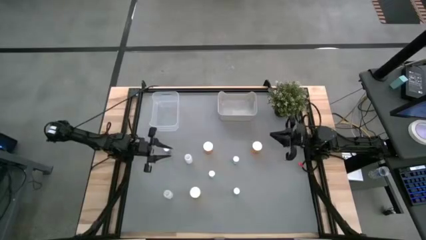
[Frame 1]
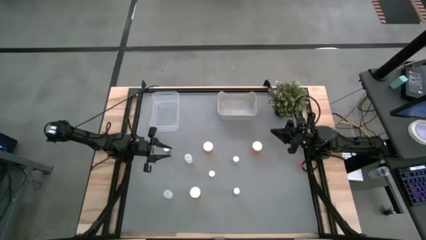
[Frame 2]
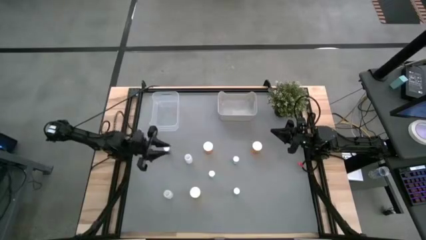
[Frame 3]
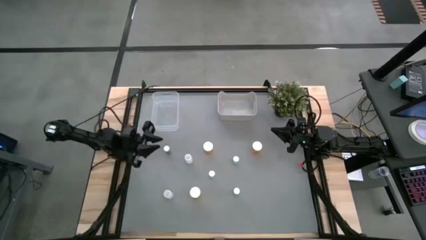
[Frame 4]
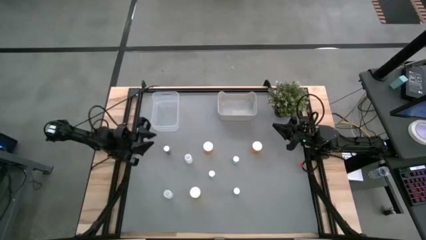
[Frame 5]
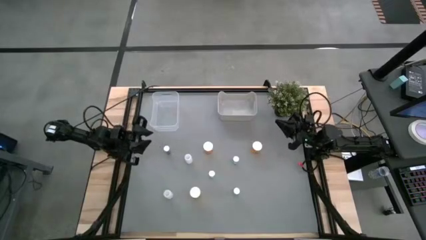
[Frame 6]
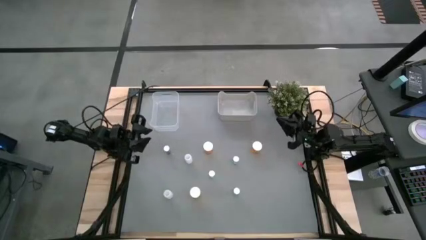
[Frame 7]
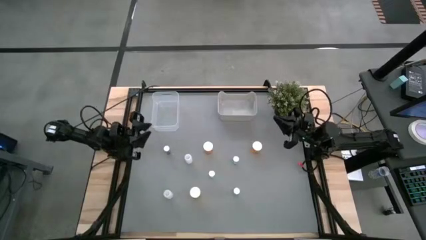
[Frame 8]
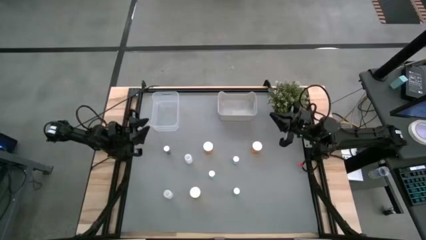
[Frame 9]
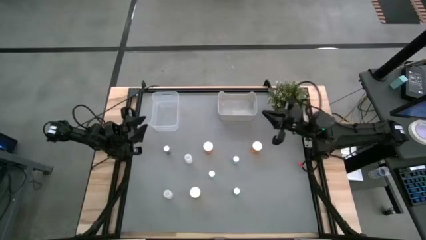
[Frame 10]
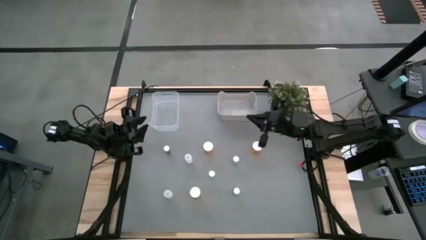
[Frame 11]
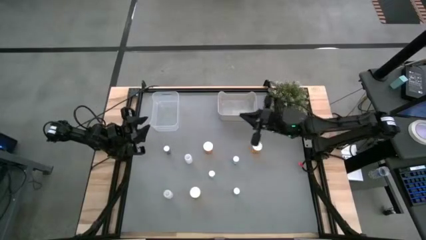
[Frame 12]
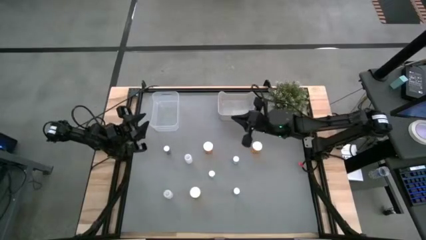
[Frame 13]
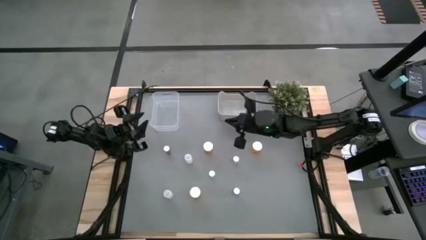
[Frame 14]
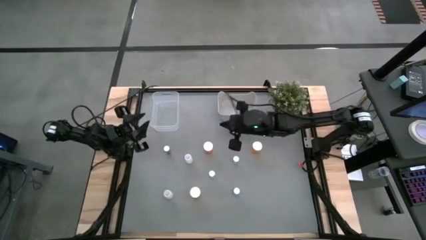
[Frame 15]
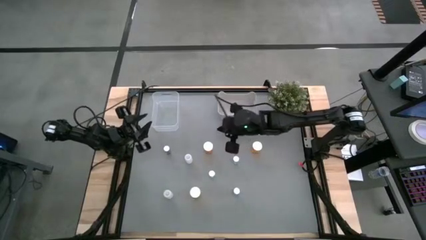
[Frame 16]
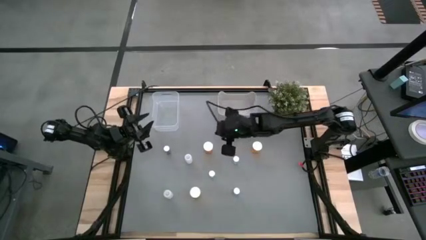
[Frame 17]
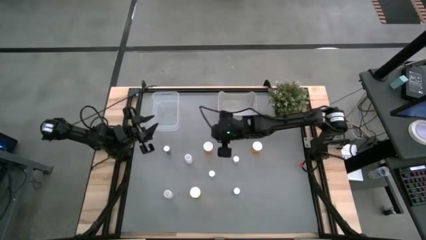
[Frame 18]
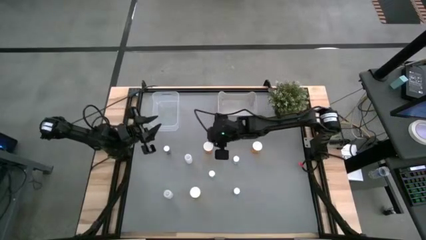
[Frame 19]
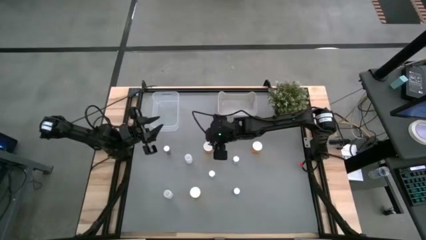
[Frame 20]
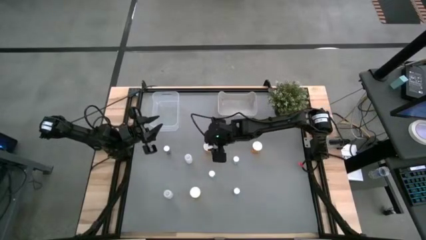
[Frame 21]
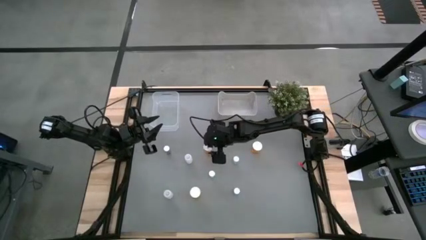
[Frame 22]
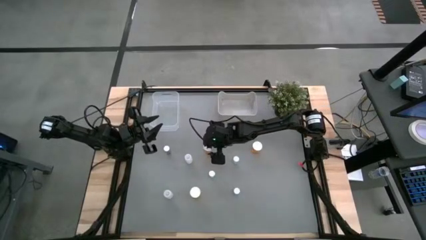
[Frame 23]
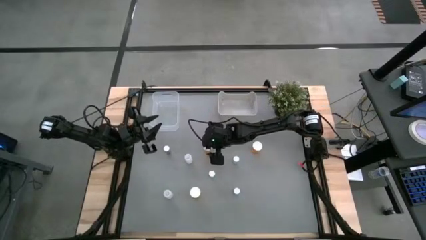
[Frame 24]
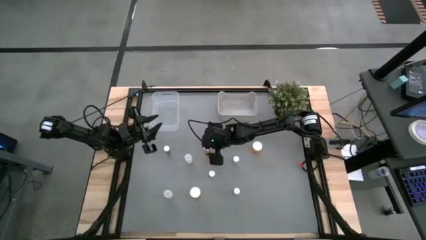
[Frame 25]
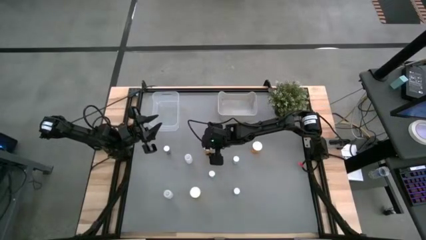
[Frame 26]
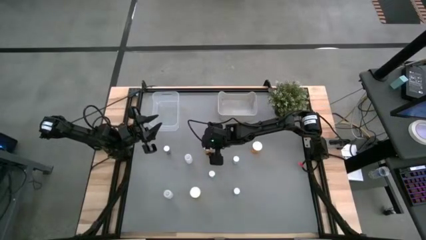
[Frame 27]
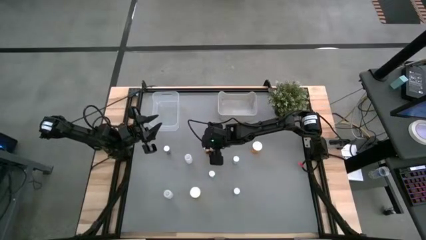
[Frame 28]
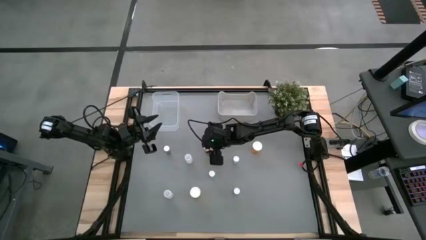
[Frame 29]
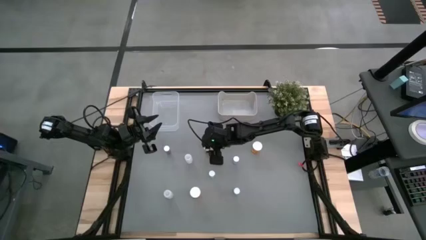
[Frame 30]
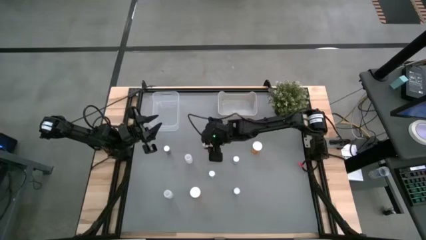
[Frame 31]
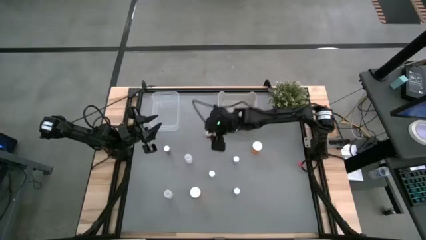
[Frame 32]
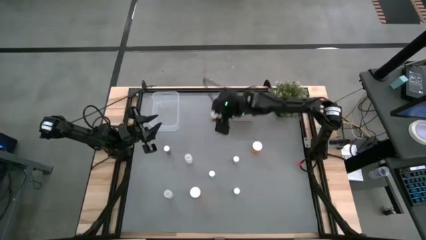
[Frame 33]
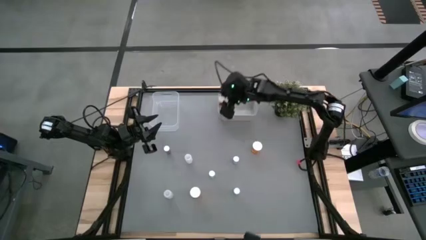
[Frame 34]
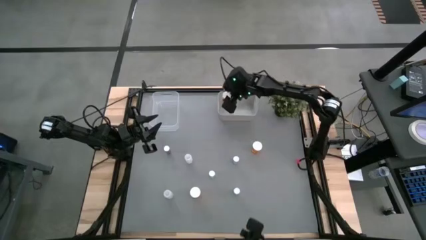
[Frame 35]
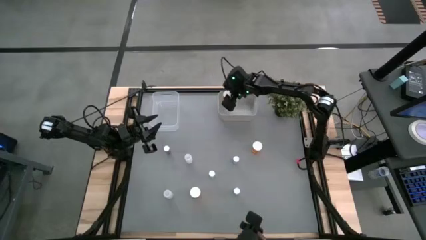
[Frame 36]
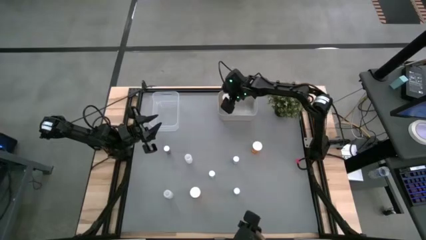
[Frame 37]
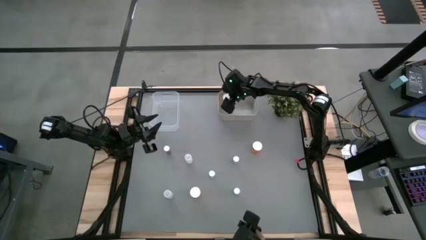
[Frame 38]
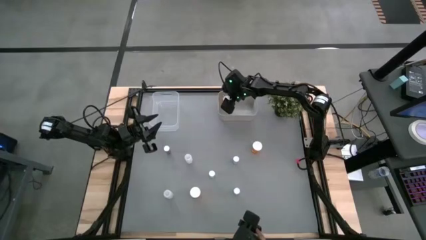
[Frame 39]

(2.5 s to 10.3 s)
Task: Pick and place medicine bottles into bin by pill shape (circle, oval)
Put the top left orange capsule bottle into the gray bin

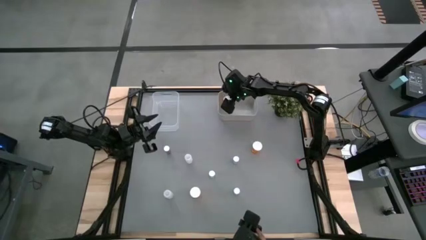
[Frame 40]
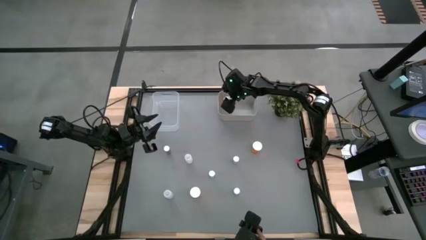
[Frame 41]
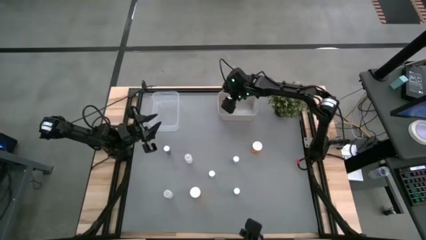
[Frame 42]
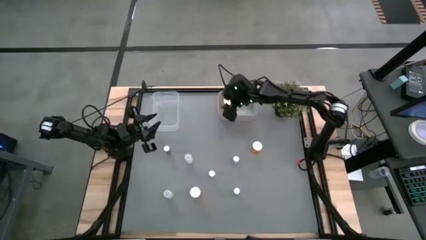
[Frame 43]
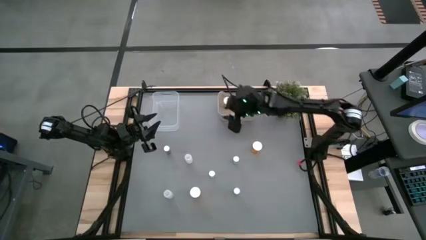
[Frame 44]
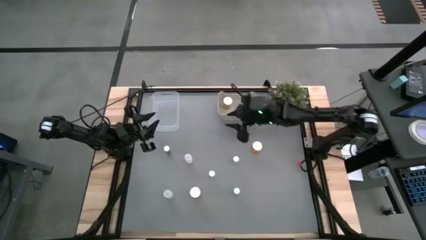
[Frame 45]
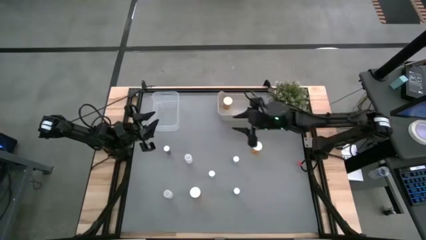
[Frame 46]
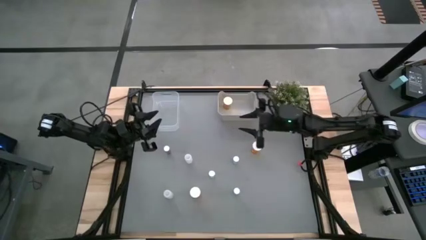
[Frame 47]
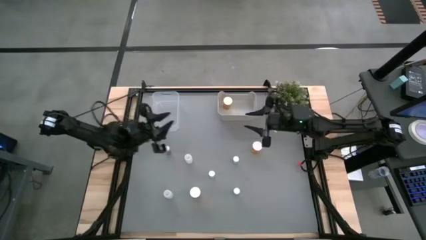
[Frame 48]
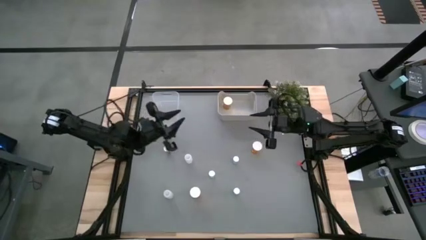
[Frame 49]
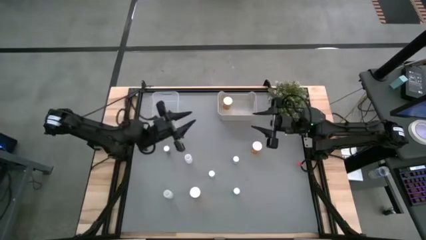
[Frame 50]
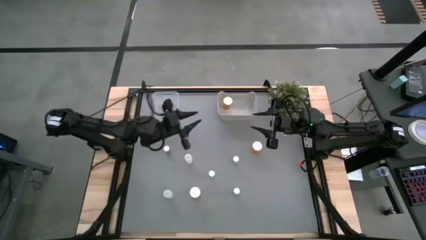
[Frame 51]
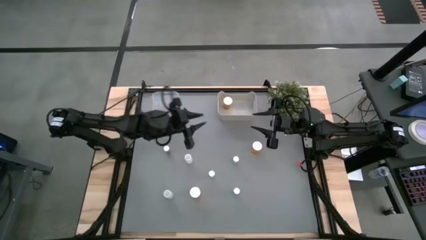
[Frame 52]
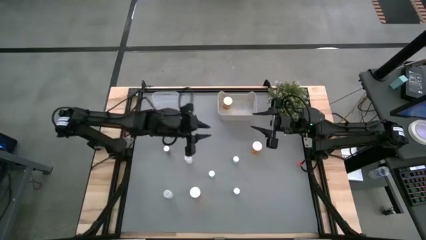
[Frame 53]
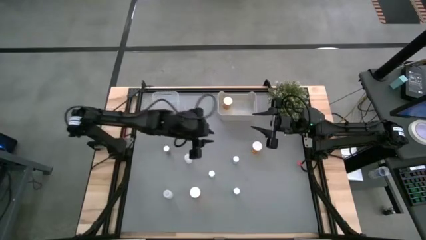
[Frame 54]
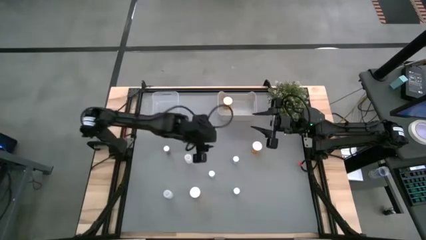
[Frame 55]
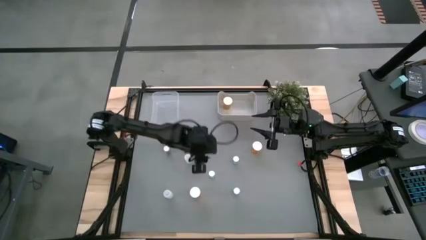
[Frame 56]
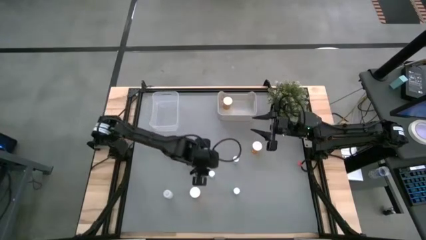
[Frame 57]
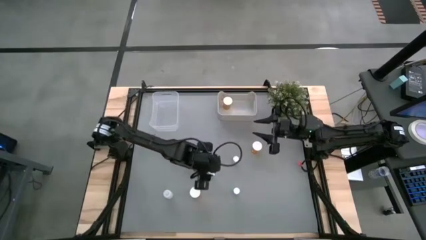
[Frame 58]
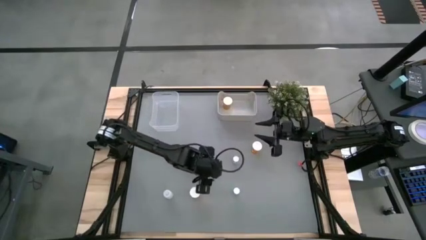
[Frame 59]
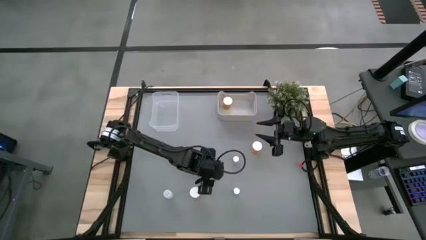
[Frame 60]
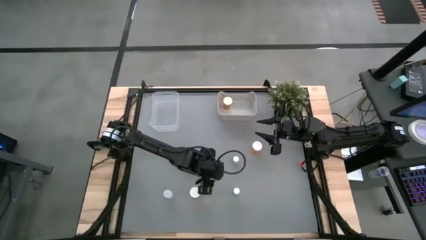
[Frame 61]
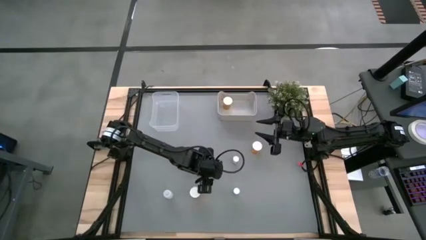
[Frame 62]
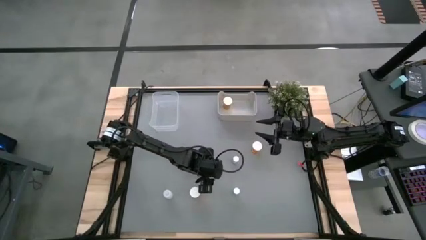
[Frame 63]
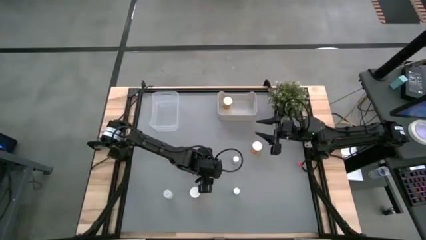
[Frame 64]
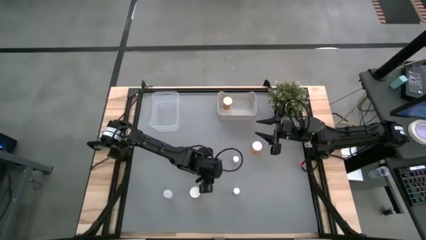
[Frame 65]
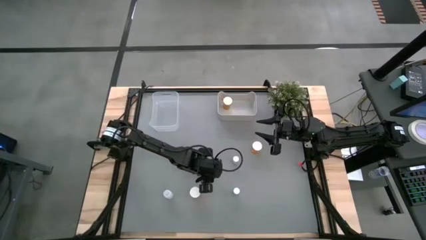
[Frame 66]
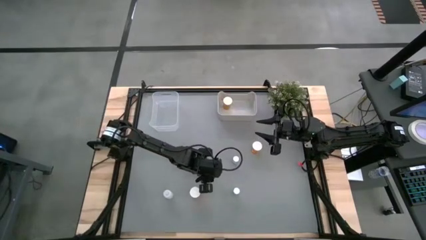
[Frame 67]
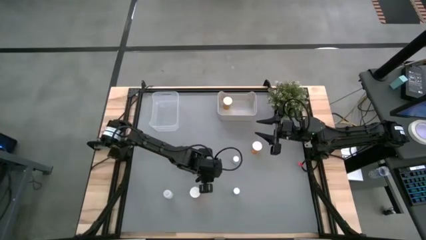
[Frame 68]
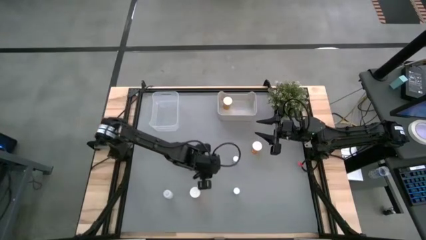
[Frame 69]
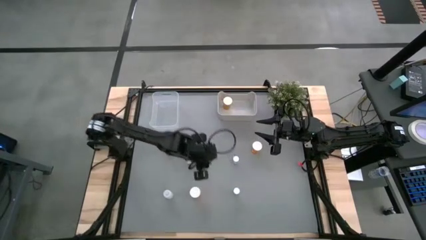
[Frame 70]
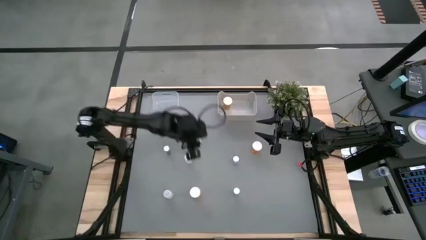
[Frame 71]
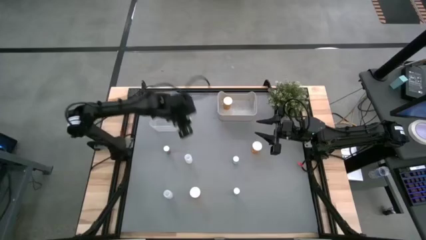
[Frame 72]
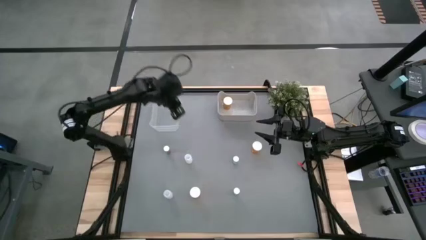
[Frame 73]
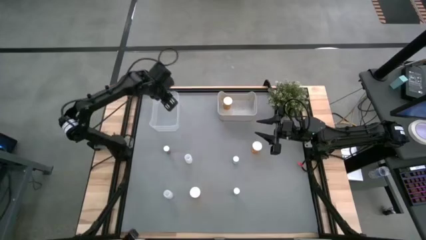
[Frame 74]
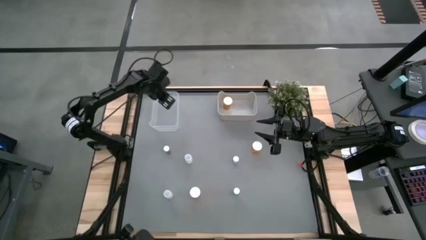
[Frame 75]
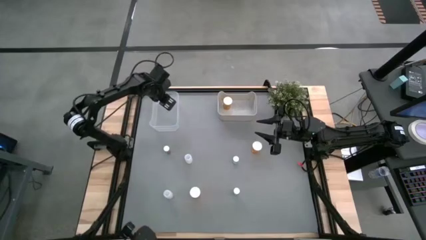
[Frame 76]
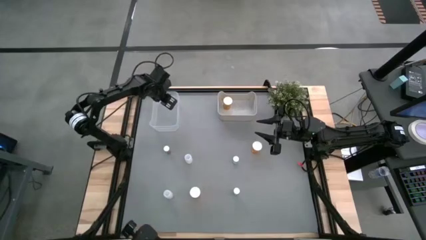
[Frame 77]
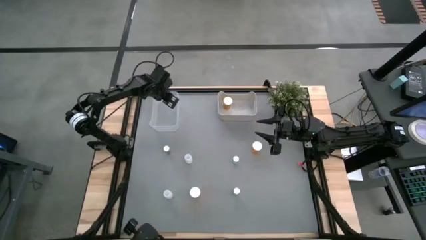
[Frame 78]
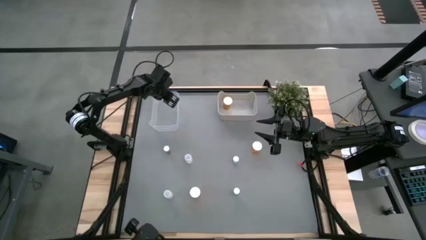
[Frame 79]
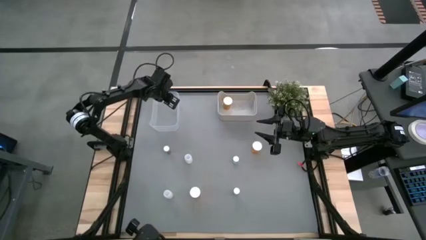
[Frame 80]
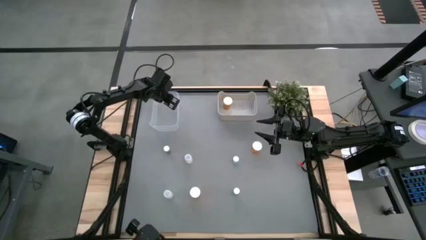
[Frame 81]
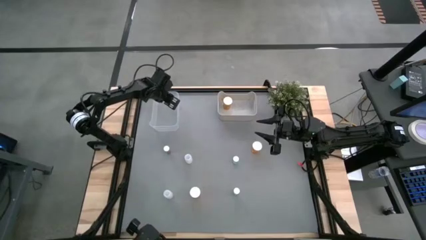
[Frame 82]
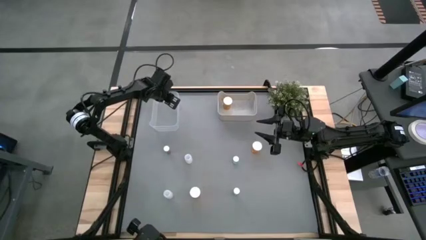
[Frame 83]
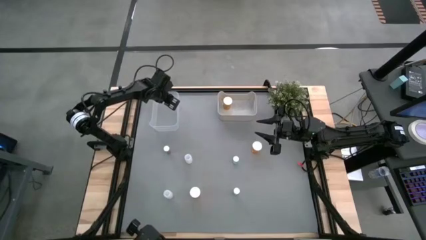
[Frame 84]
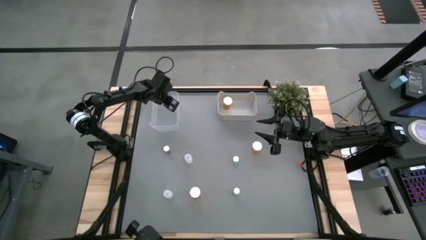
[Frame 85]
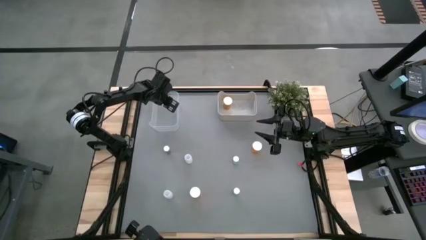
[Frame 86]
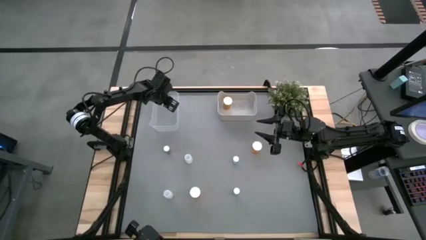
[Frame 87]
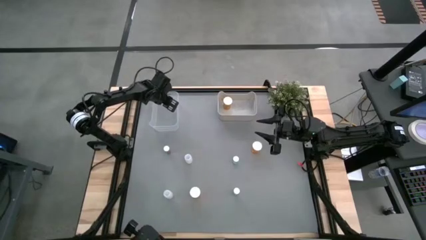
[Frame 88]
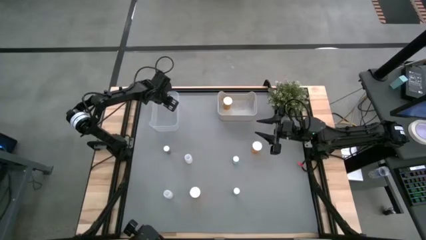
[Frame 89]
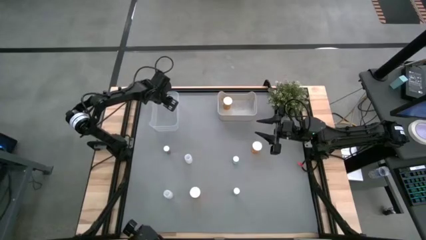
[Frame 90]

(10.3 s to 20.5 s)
Put the middle blue tablet bottle into the transparent bin
